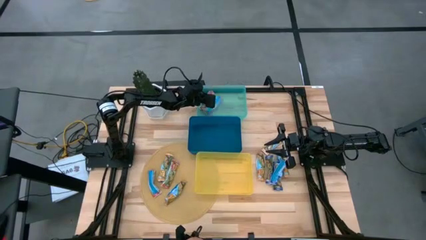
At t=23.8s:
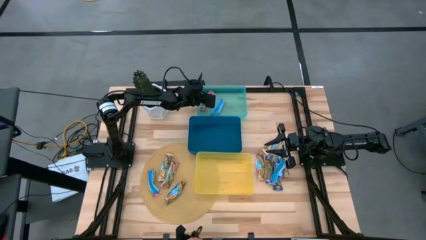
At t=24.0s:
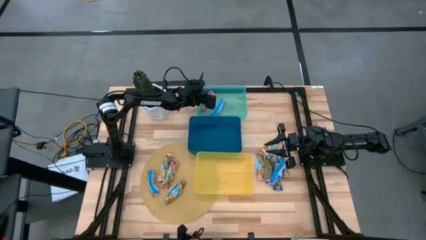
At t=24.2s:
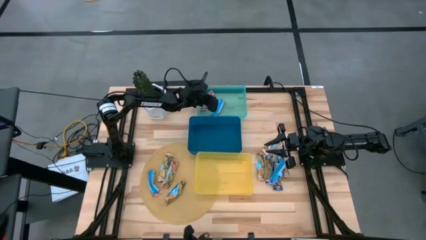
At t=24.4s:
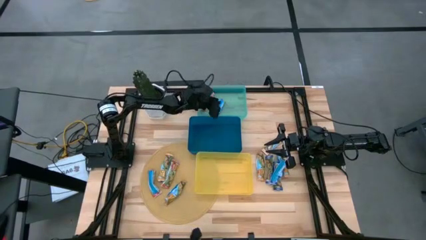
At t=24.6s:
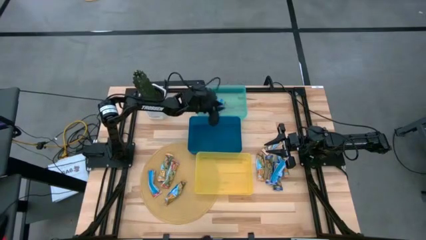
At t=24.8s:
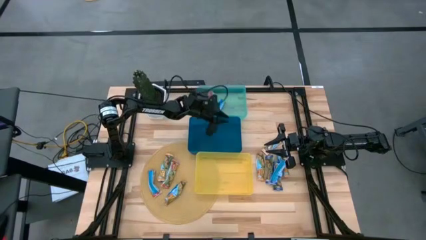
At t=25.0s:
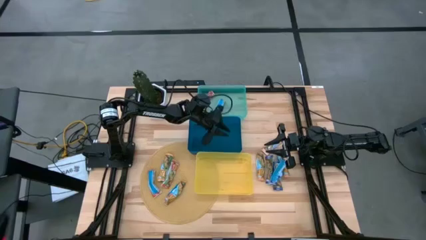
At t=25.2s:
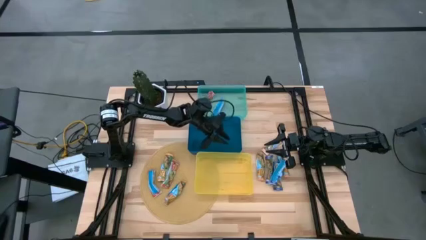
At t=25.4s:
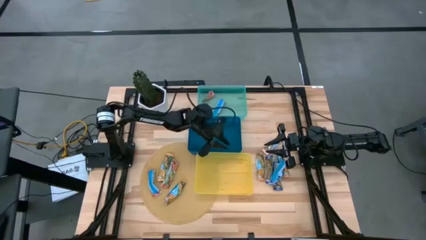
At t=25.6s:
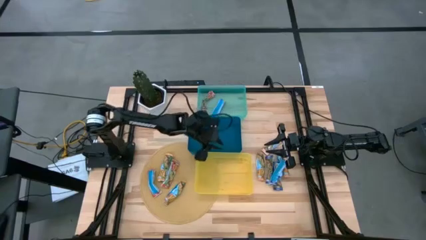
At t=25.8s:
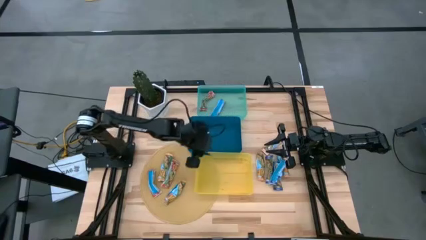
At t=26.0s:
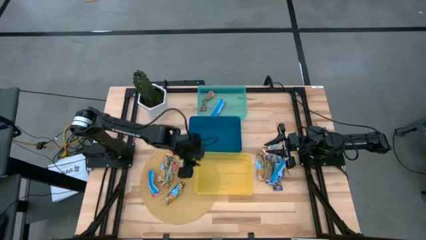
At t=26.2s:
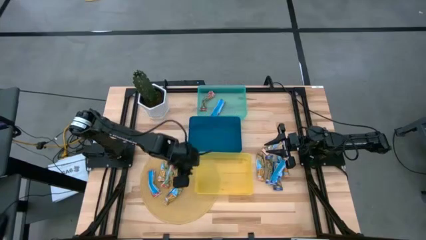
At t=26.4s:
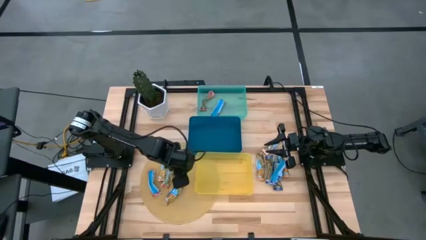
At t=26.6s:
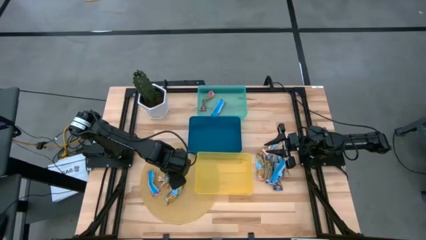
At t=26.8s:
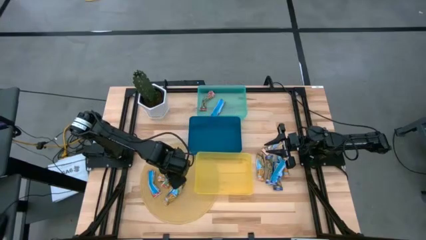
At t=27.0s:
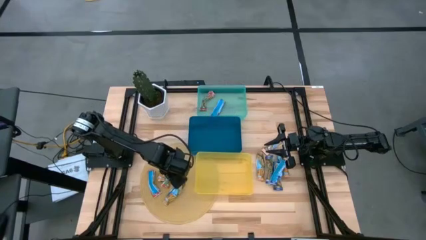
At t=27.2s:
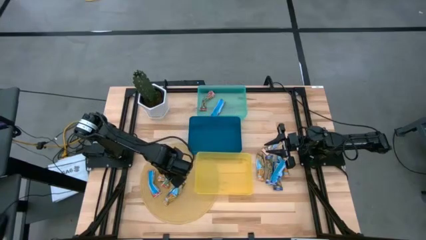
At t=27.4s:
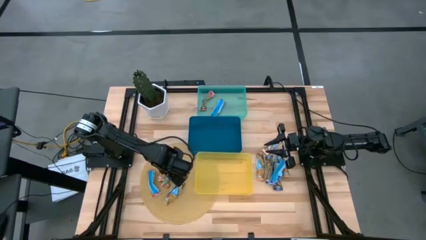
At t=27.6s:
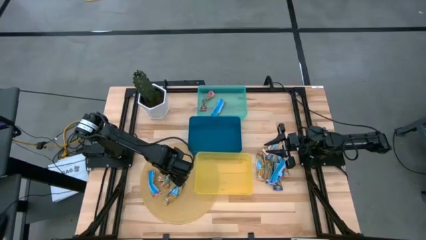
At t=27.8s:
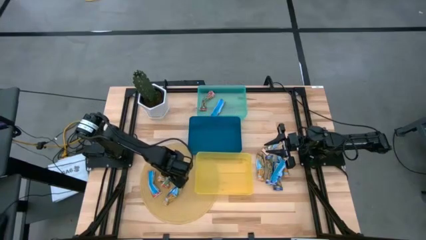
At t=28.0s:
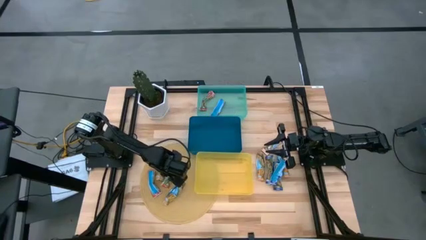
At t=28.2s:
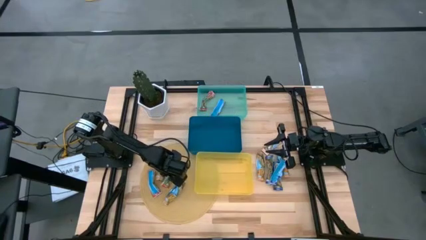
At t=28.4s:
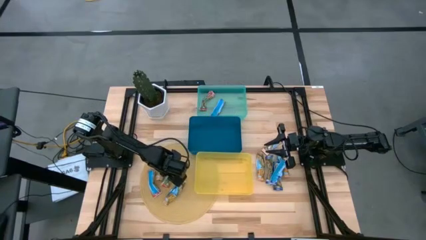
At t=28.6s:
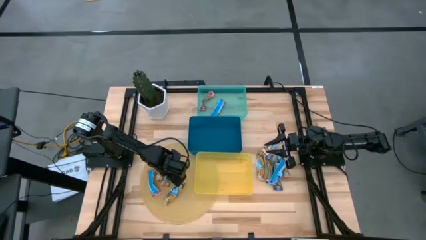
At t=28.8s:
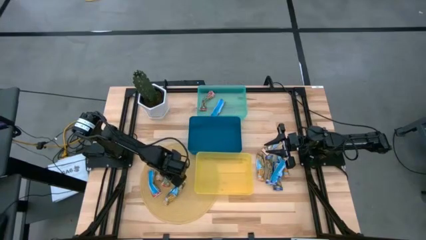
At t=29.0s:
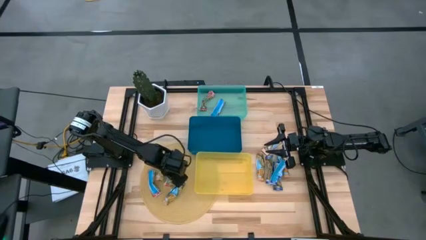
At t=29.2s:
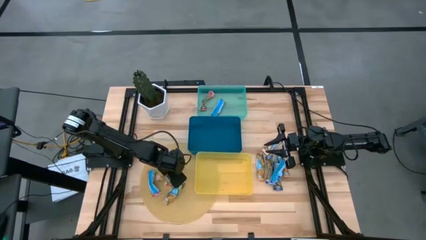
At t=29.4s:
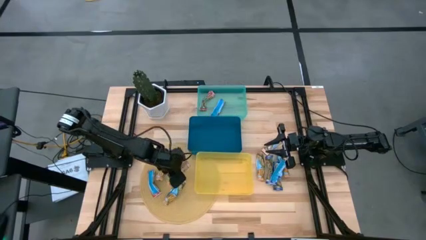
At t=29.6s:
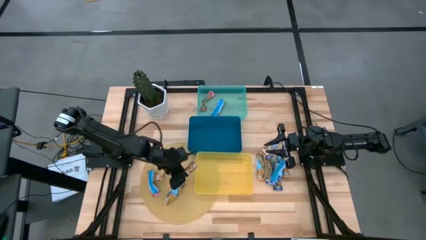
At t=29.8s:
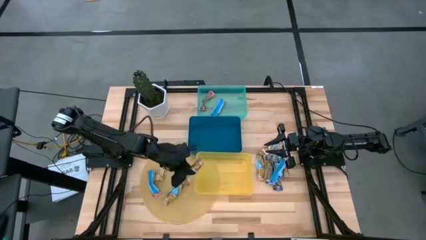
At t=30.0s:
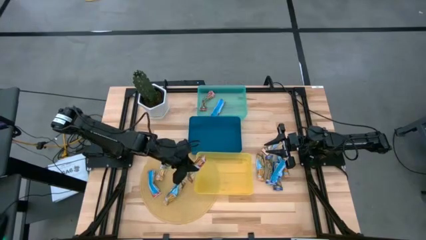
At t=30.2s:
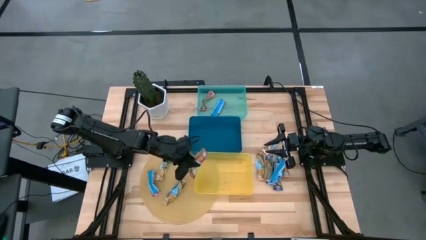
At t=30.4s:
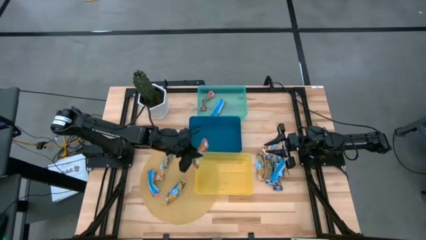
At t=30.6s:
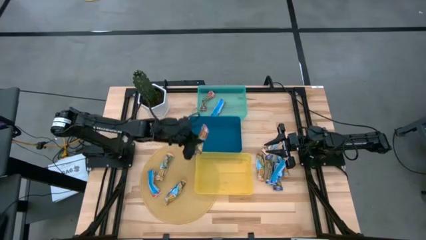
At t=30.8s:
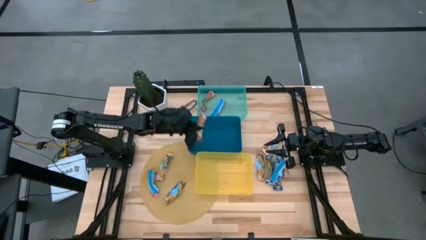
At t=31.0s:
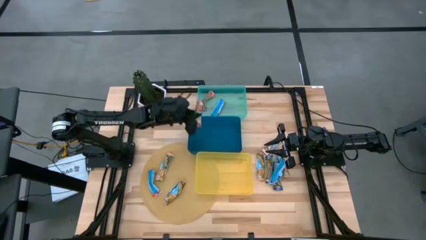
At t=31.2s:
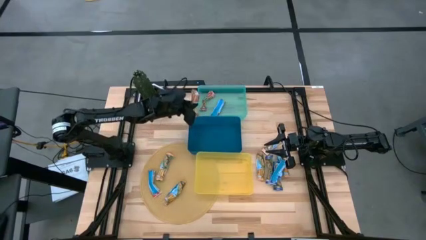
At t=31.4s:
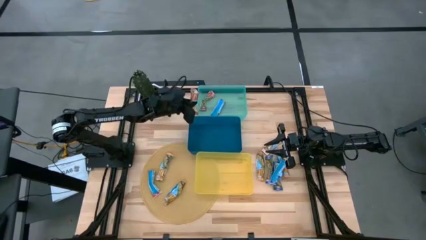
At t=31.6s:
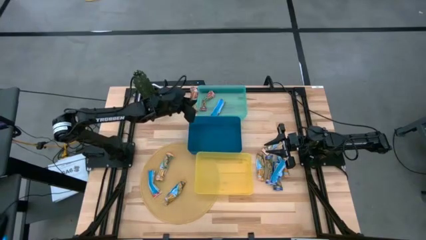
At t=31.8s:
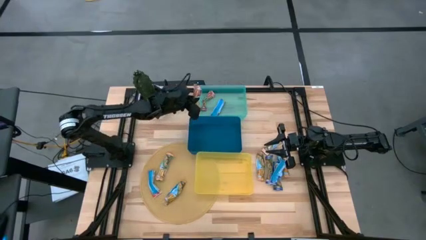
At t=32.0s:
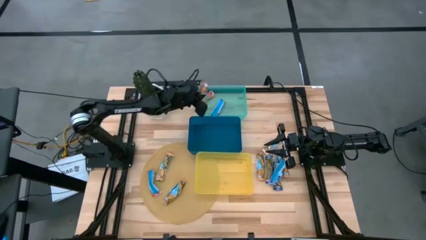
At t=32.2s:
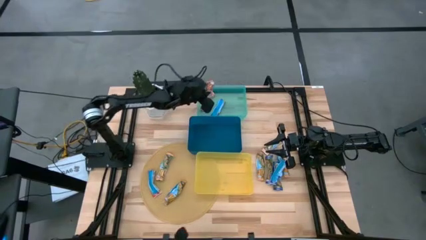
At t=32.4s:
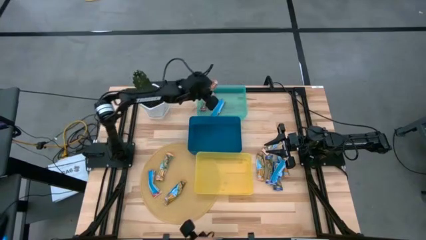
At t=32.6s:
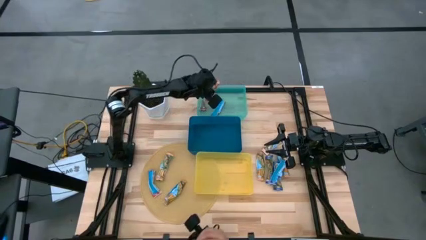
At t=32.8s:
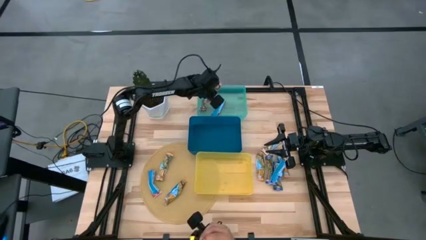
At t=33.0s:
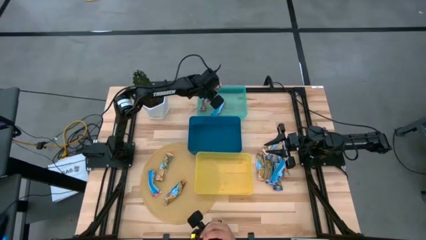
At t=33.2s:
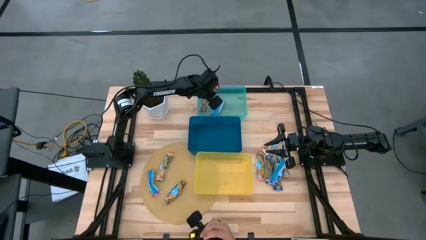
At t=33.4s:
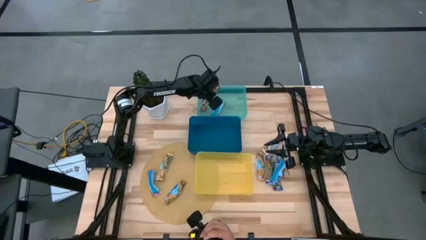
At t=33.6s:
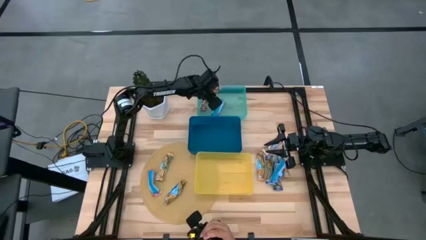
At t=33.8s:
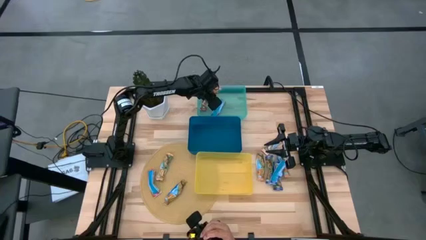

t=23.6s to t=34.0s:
Task: Pick and place Granola Bars by type
Put the red granola bar into the green bin

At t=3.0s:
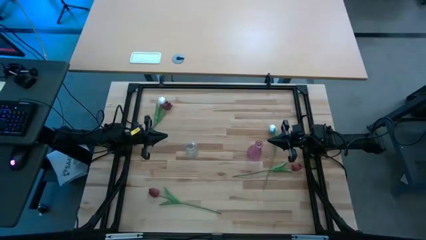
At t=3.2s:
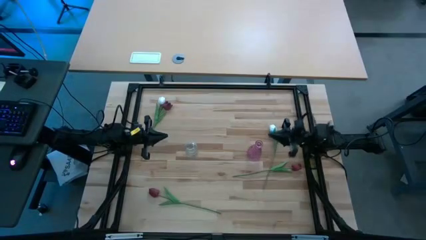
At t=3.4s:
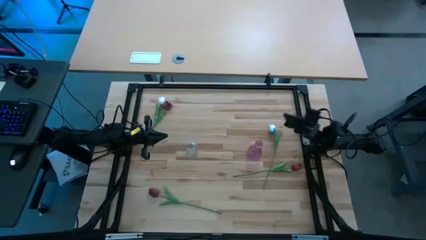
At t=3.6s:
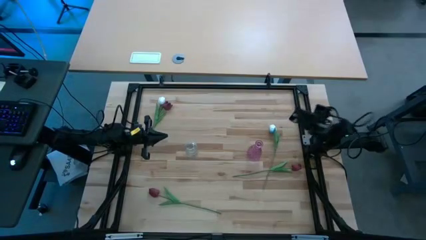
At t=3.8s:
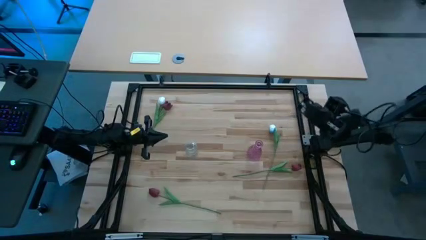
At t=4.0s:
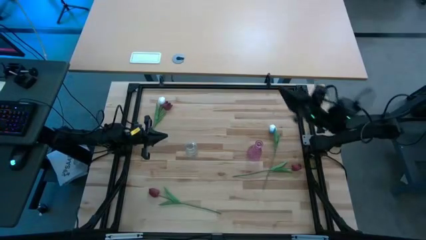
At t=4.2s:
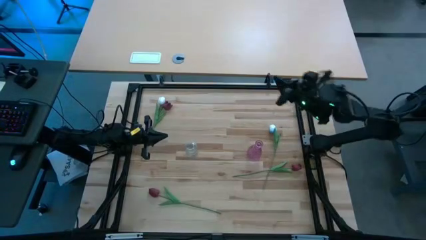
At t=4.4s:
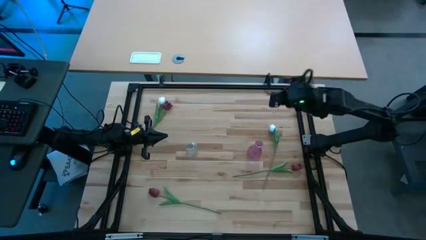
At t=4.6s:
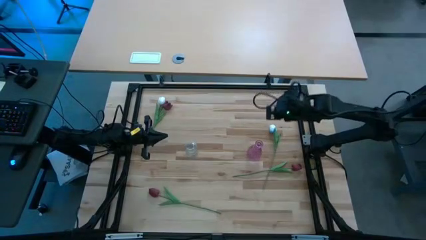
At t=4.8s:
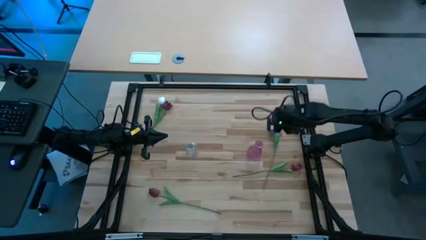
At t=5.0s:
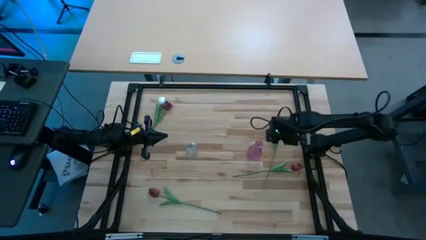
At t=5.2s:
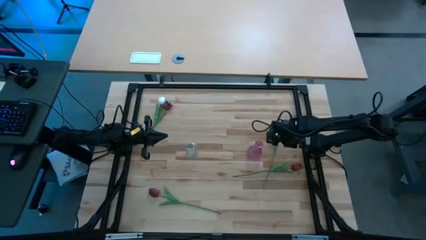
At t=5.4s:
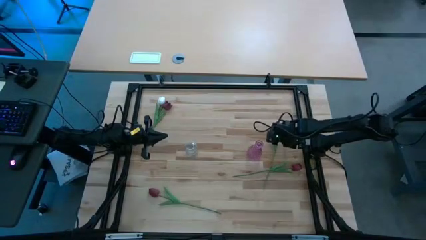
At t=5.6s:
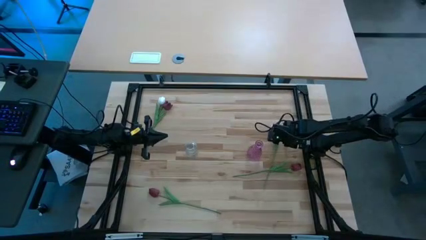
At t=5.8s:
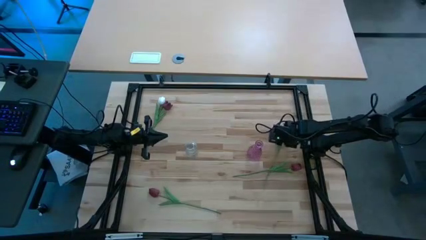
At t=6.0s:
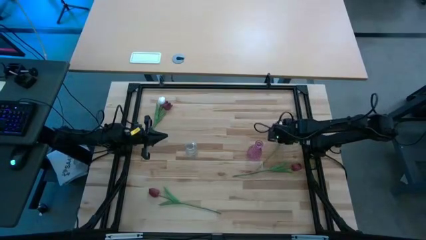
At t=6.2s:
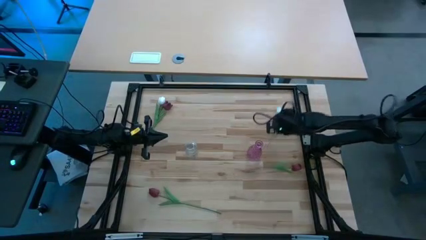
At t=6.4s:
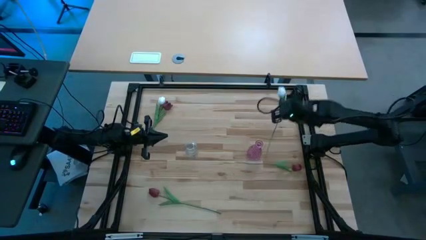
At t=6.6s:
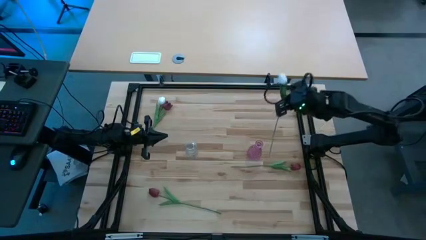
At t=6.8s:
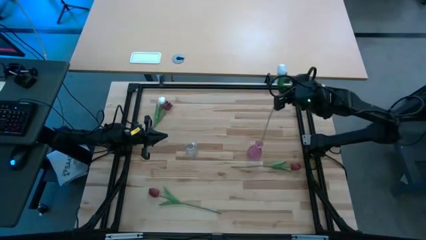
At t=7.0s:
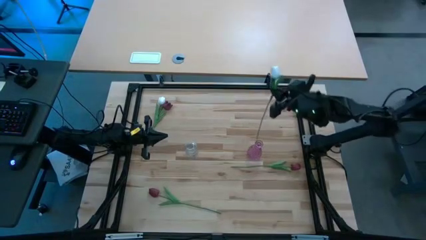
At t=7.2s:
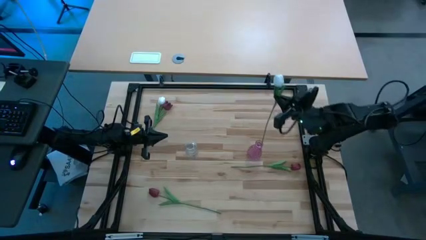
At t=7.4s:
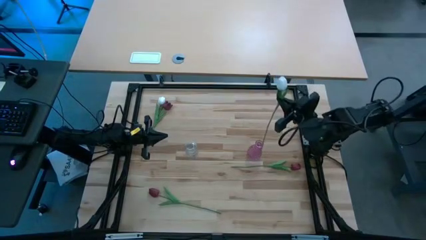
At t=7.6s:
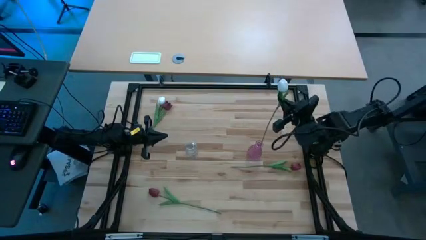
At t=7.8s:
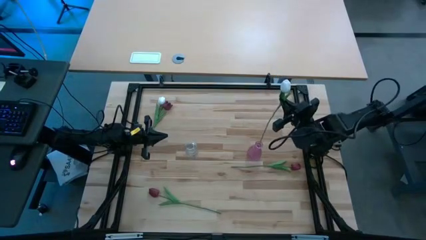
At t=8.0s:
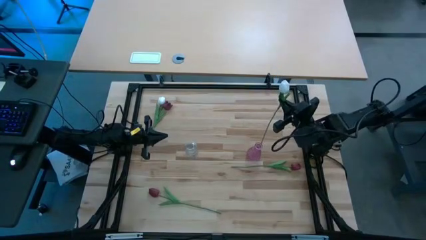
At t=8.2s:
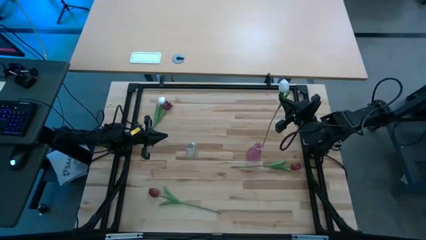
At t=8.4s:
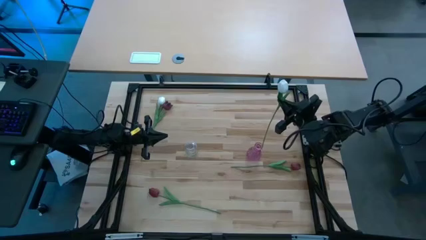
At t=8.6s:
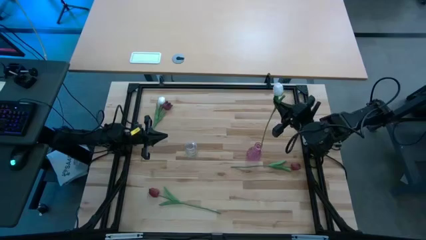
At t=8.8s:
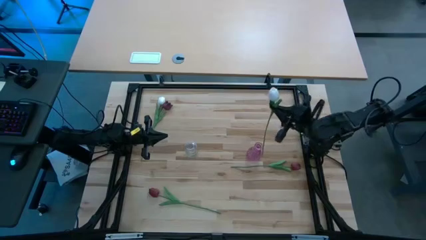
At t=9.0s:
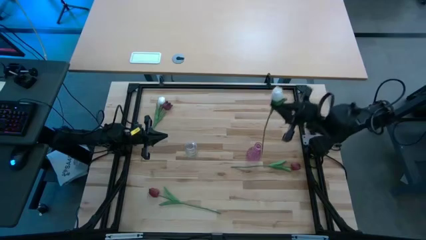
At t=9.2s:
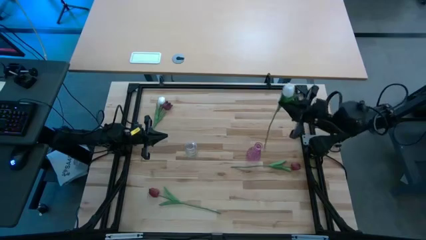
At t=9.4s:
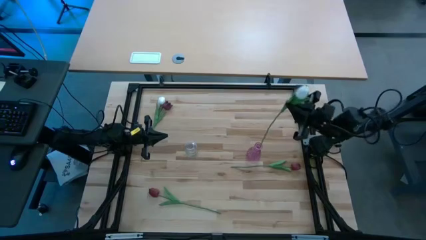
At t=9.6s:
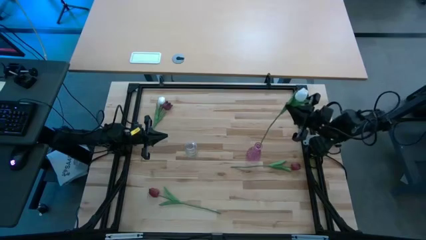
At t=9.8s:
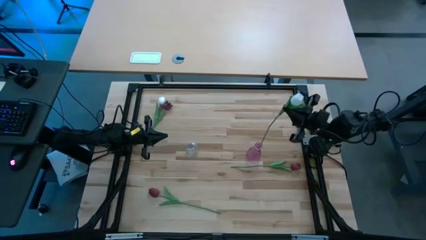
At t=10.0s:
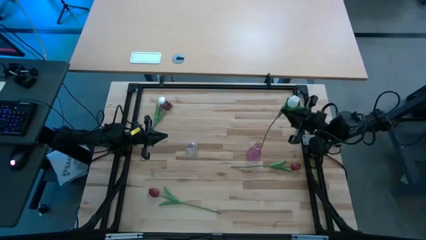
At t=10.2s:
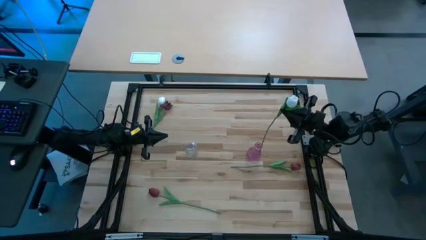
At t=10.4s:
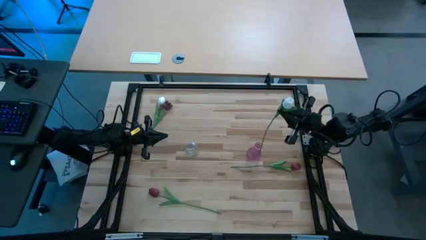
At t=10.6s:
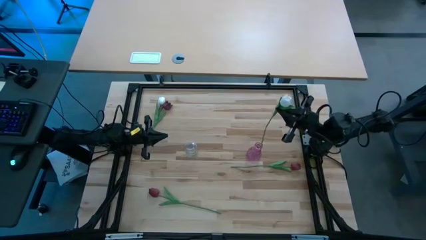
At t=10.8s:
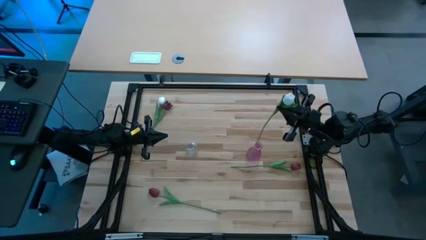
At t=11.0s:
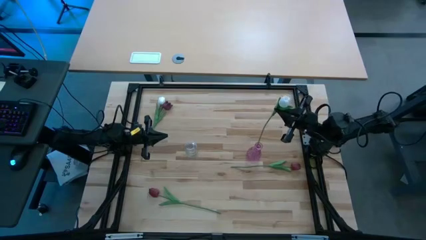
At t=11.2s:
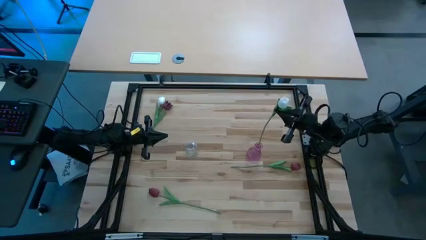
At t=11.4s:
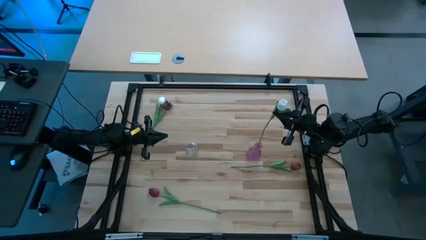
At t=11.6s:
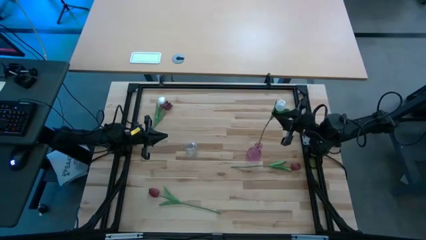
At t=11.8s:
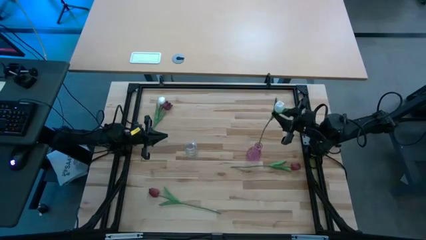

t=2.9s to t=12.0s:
Task: Sort flowers into vase by color
Put the right white flower into the purple vase
